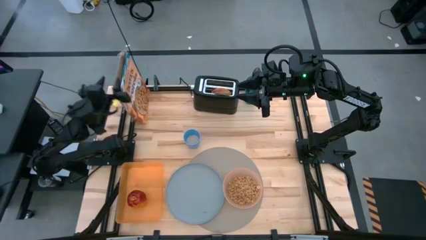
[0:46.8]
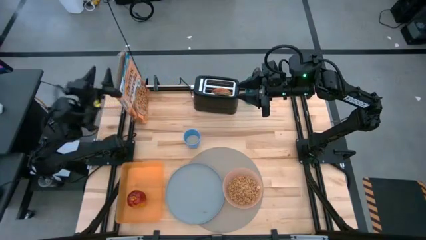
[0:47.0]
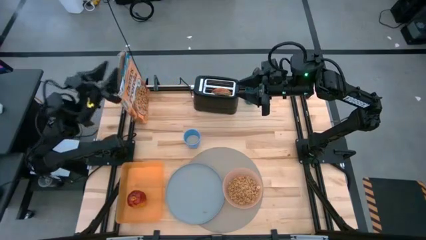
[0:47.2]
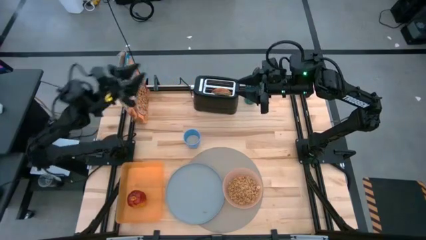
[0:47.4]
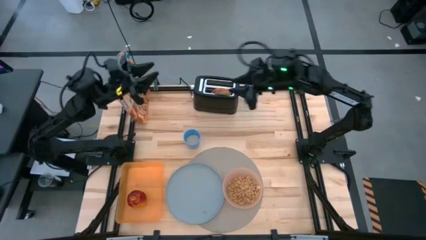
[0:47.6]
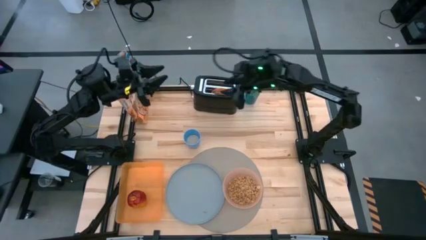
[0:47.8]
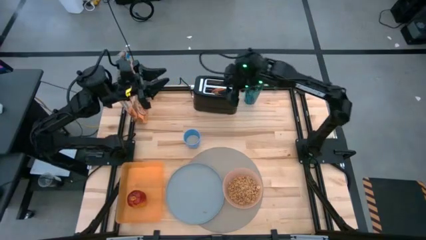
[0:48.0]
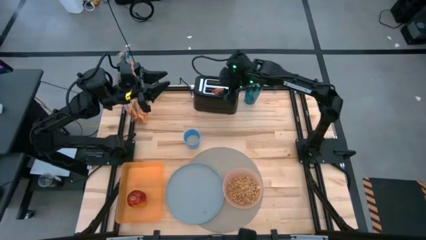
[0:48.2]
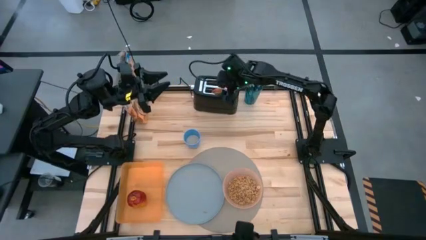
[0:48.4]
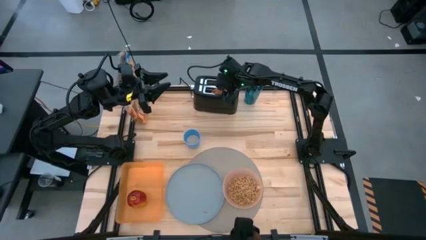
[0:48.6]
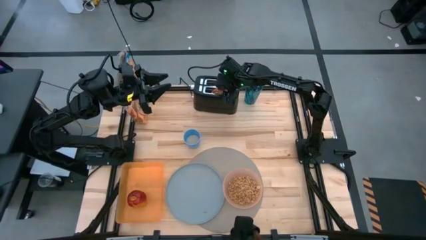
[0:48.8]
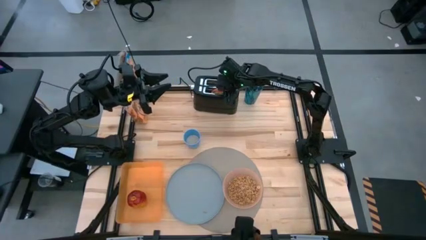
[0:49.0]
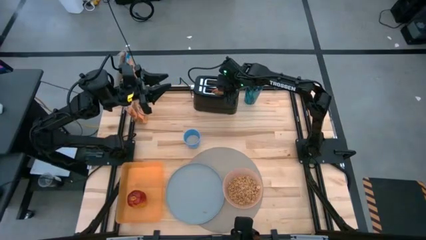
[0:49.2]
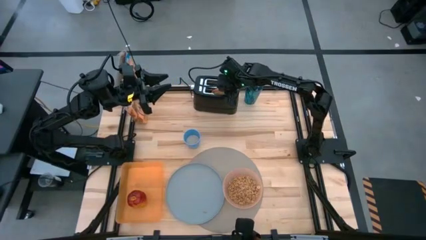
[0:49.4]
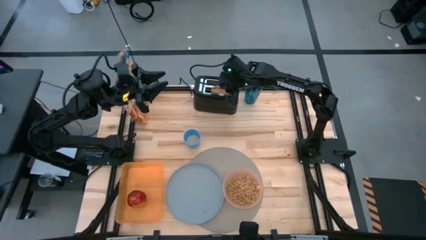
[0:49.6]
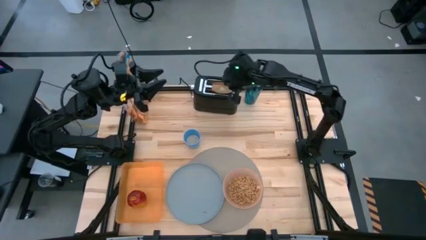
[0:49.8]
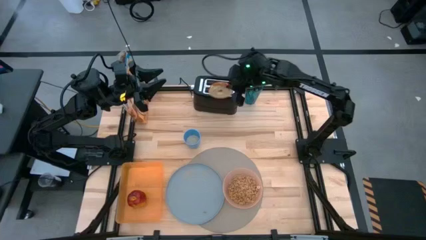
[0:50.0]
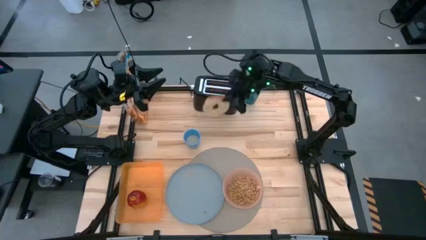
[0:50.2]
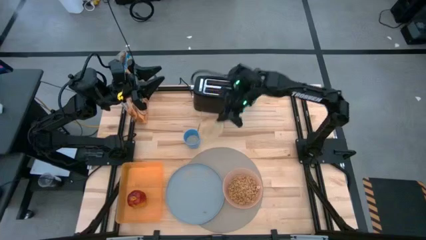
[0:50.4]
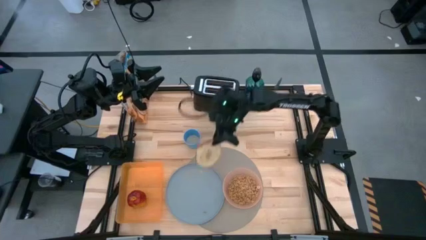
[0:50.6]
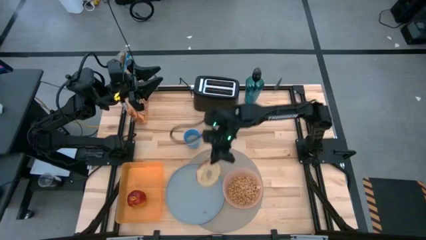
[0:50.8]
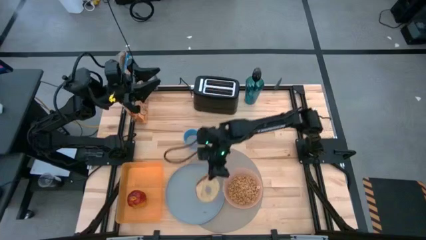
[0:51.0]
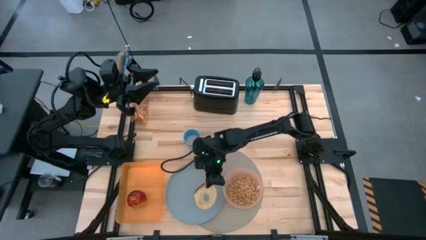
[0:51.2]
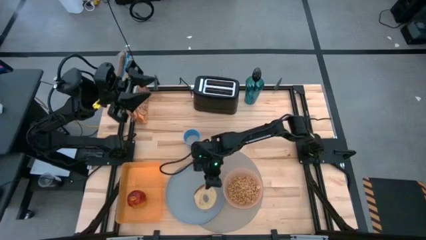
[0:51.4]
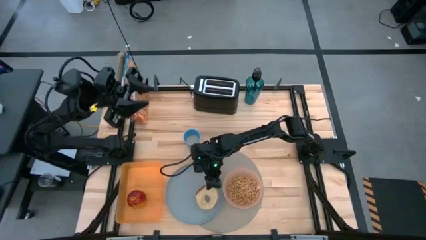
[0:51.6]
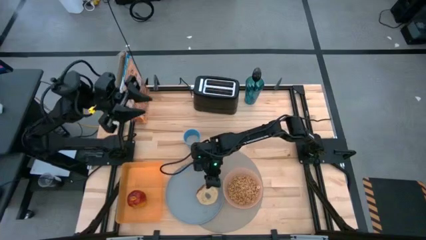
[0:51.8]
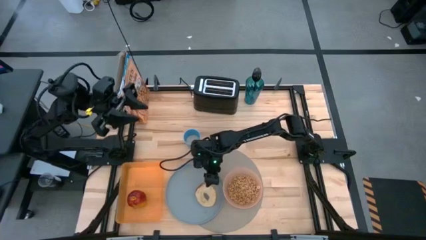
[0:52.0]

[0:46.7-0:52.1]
Task: Arrange a breakfast setting
Put the brown toast on the gray plate

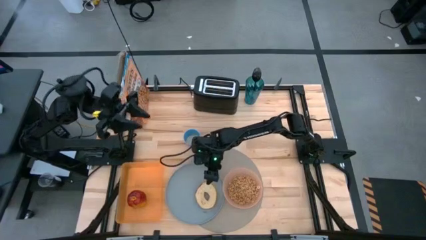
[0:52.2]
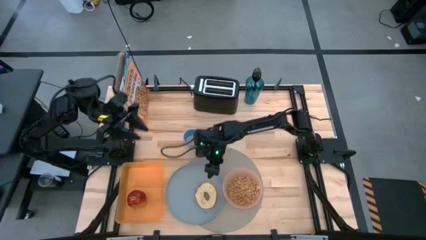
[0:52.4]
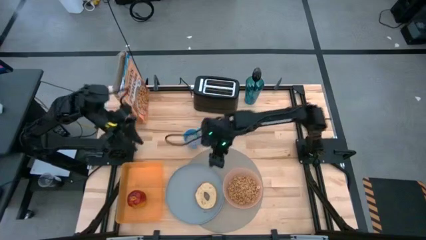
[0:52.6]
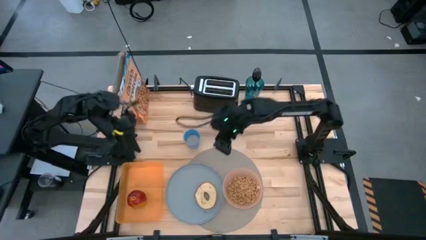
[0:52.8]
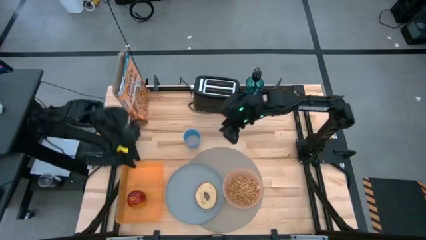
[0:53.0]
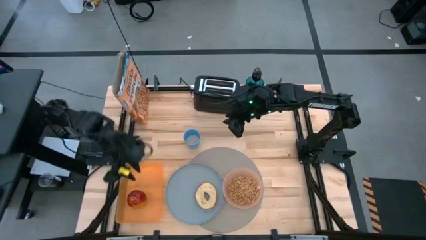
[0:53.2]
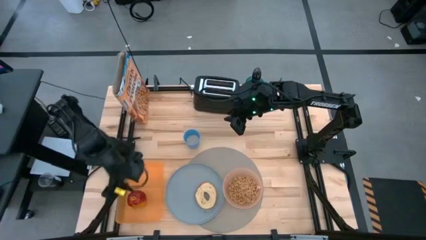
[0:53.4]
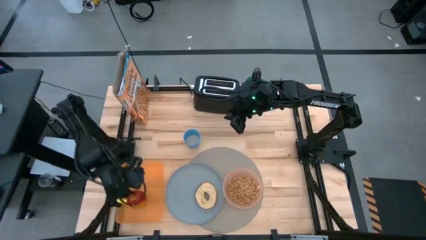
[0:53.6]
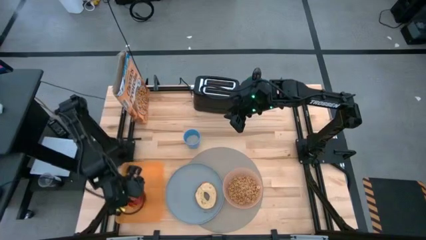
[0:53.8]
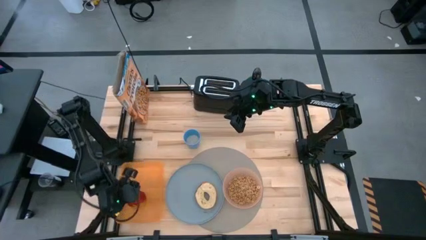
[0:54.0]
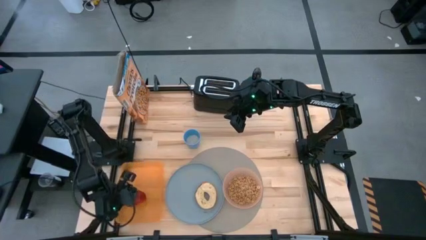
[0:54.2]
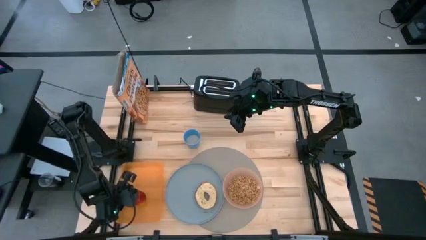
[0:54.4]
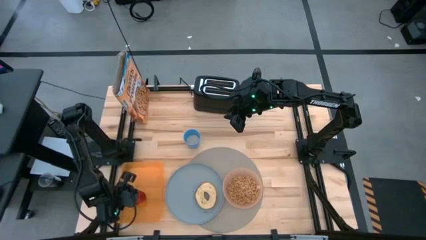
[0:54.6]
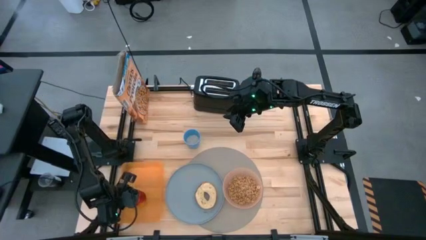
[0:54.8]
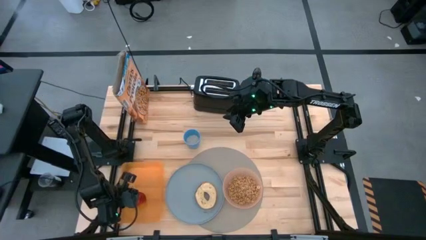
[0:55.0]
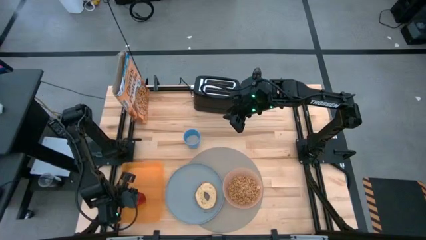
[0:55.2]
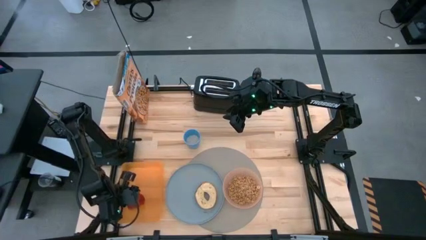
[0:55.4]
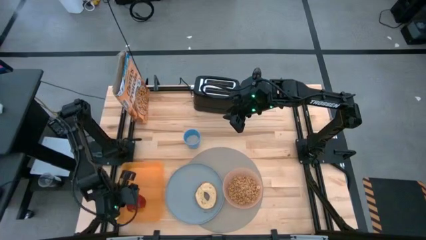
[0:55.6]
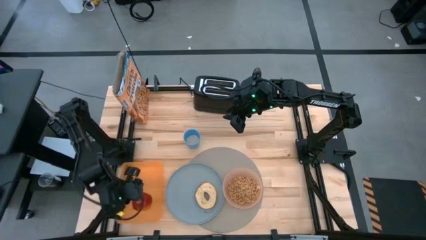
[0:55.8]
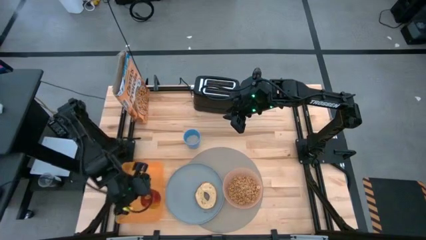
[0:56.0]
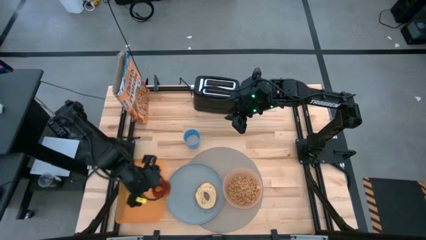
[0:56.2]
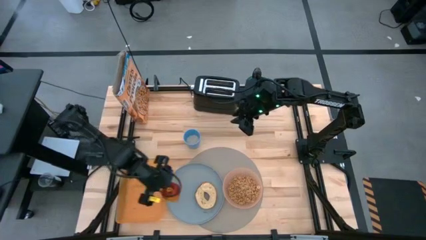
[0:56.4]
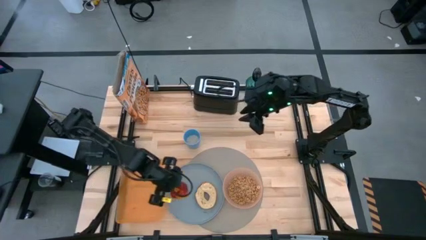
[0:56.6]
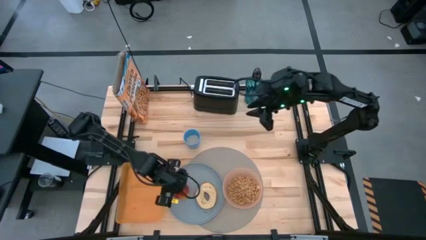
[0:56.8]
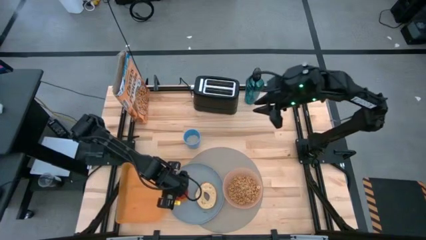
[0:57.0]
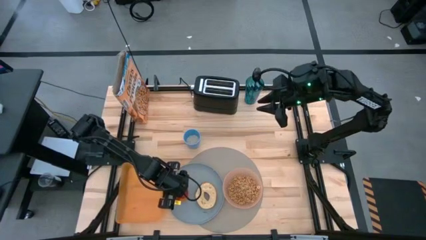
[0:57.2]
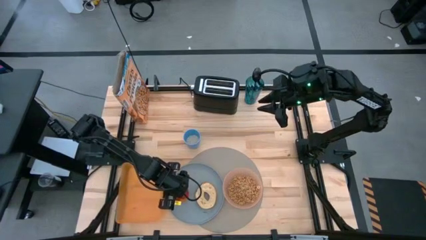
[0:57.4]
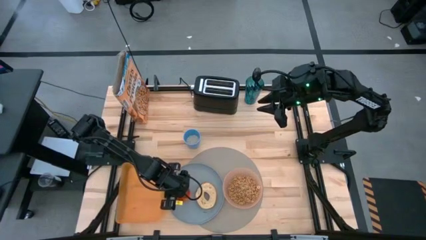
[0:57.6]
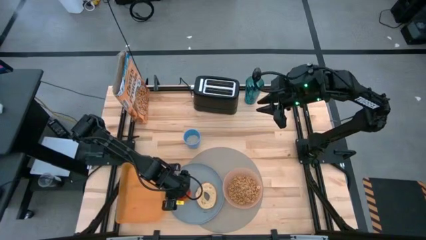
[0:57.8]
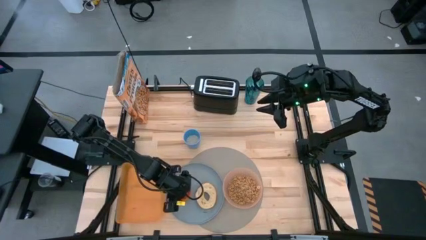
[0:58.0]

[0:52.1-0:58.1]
Put the red apple on the gray plate

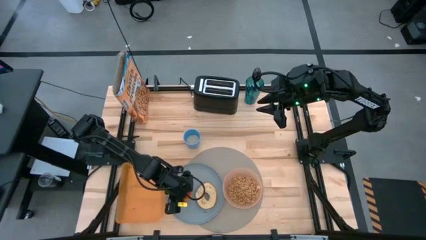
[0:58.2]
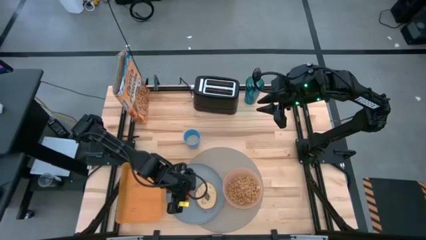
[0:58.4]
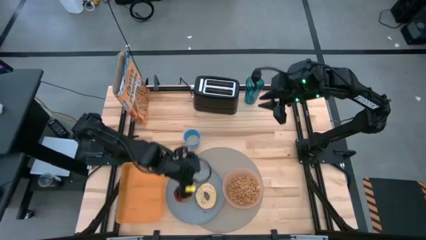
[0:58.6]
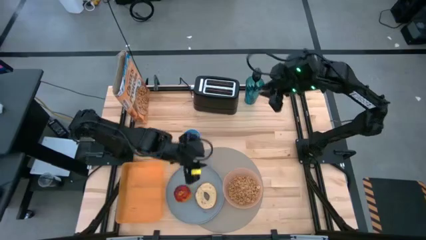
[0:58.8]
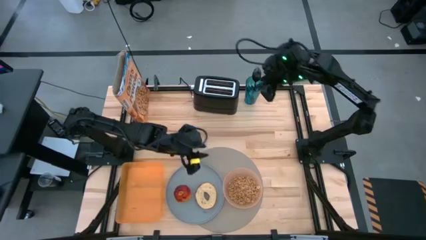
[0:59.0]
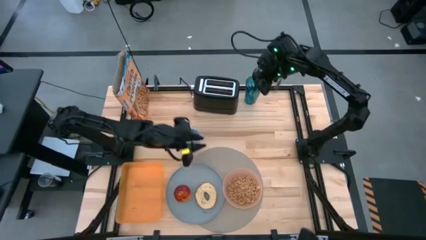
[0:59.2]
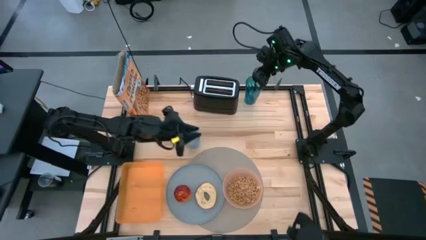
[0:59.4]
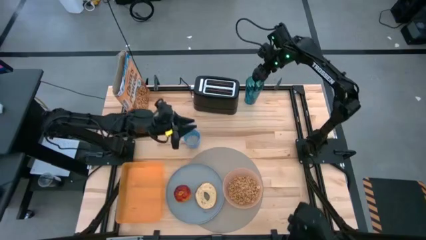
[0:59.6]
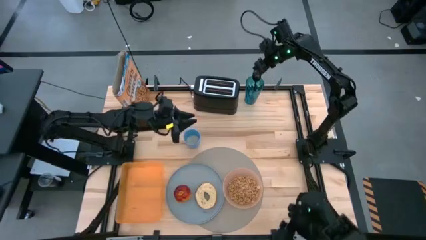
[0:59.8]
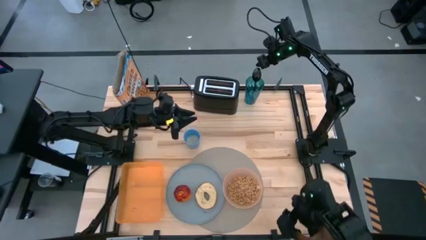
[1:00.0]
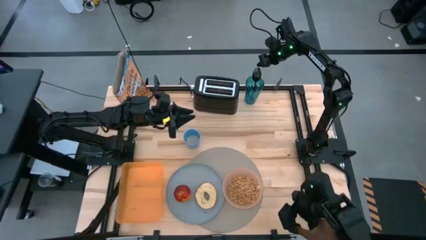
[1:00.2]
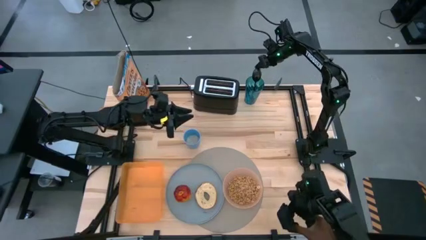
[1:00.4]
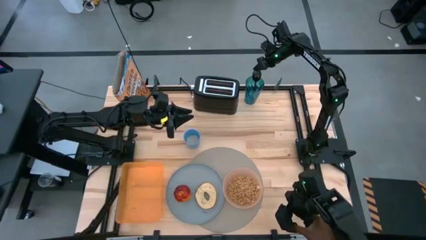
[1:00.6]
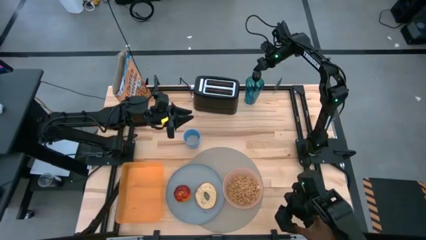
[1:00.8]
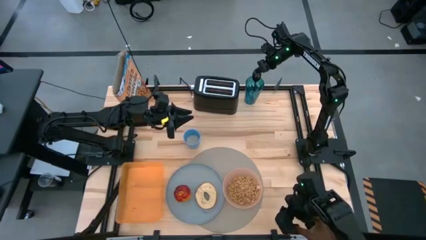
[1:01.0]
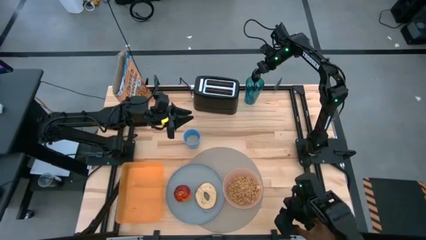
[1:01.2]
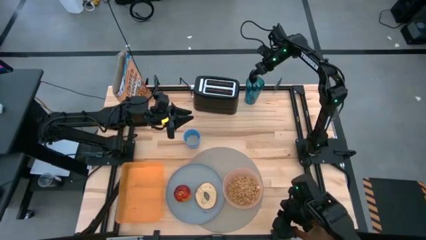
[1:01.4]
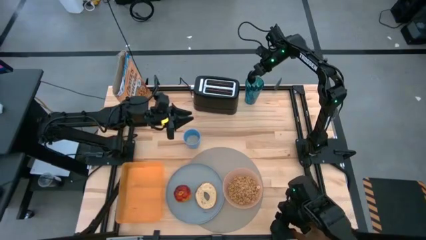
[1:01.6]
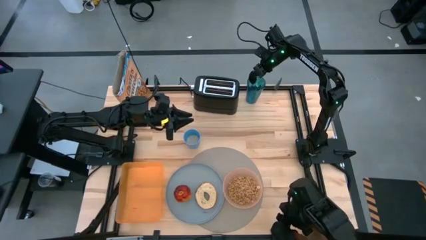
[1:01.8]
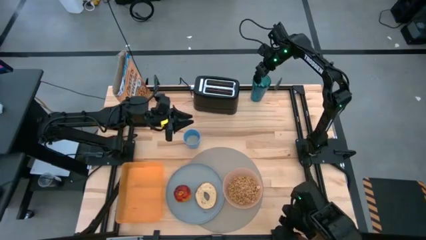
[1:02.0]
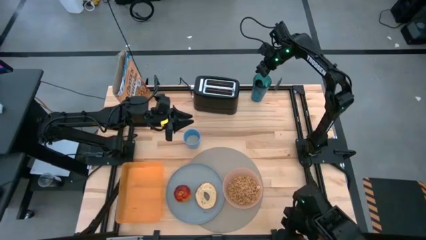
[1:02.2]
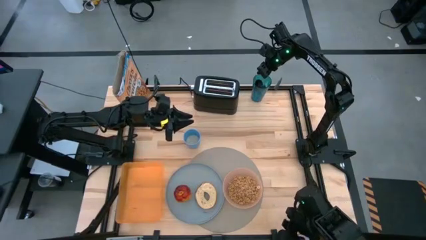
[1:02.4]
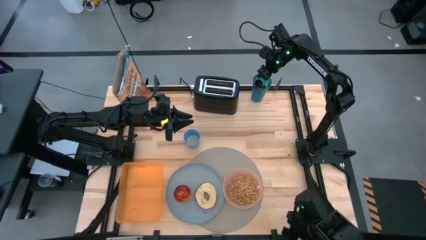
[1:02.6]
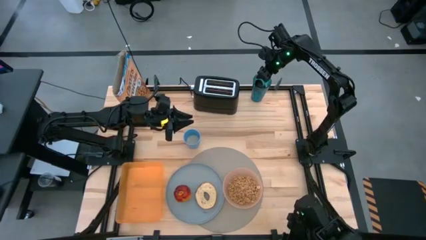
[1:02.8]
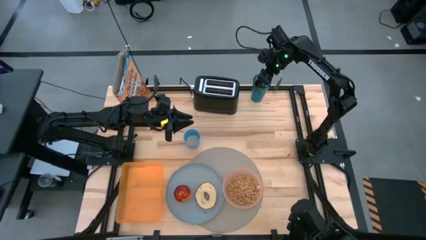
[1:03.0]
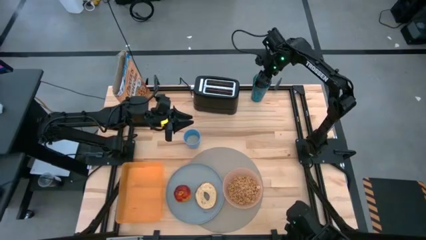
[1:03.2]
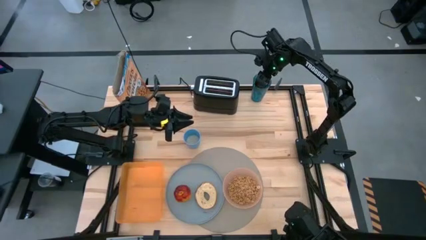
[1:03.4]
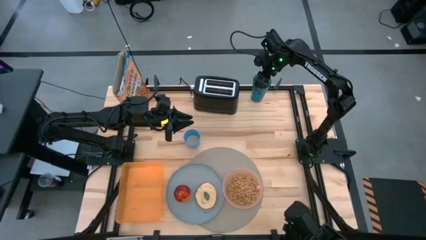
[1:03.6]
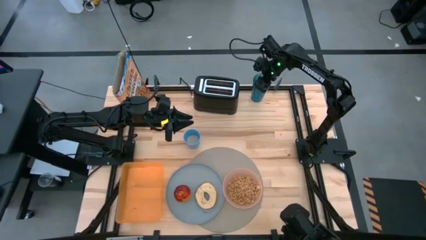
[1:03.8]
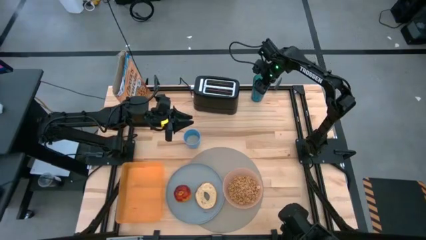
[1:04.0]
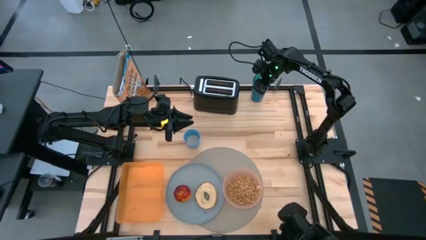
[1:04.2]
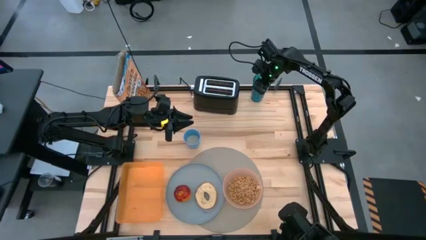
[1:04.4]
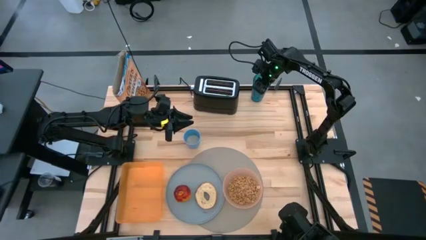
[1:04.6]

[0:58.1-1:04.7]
Put the black spoon beside the pink bowl on the table mat
